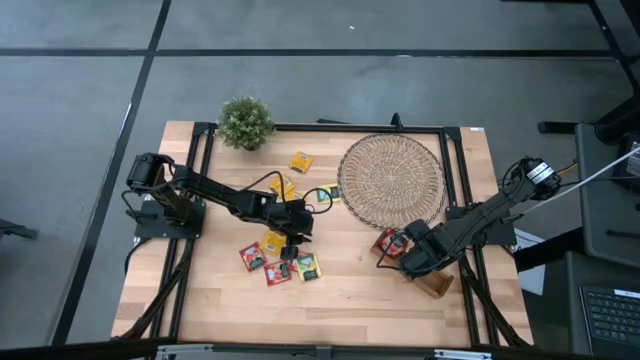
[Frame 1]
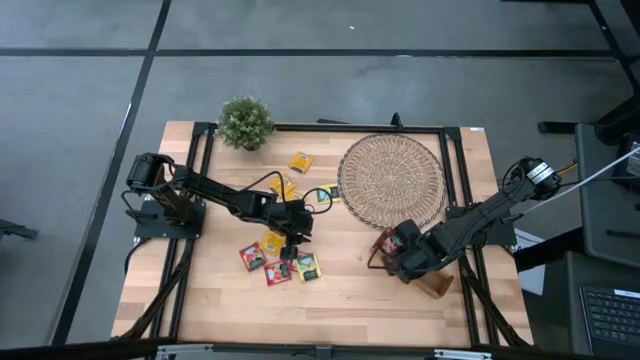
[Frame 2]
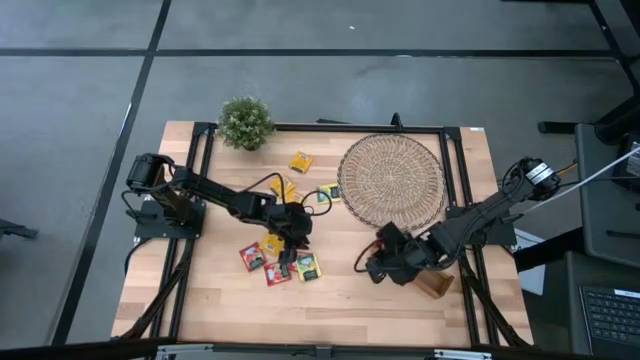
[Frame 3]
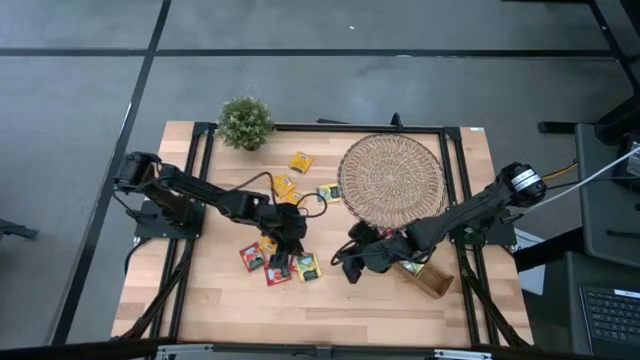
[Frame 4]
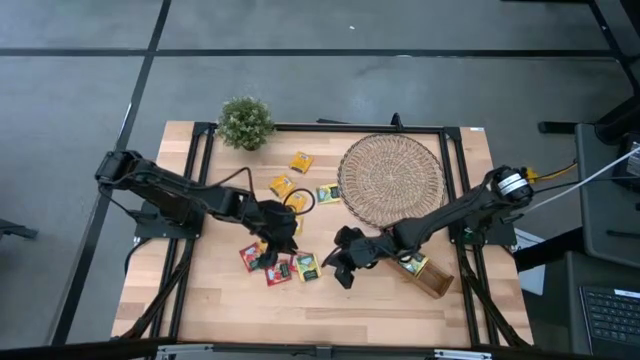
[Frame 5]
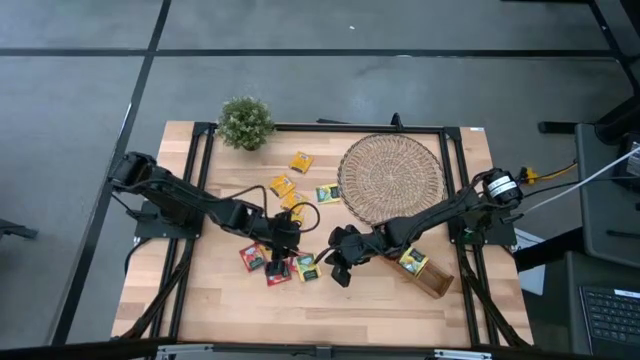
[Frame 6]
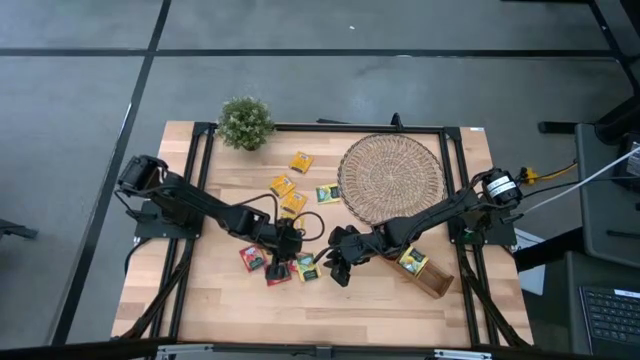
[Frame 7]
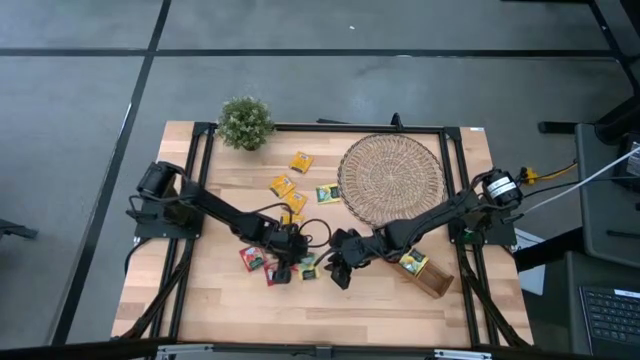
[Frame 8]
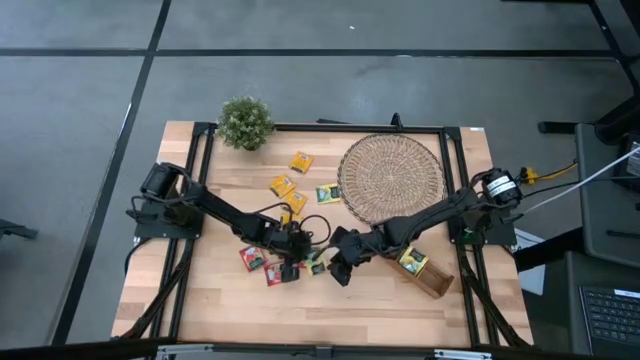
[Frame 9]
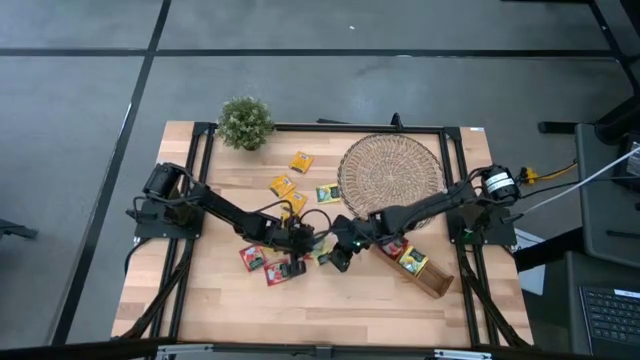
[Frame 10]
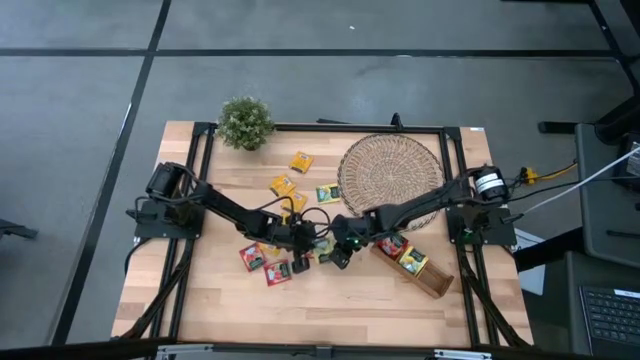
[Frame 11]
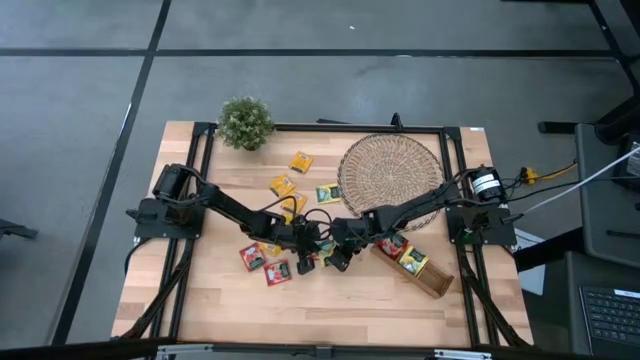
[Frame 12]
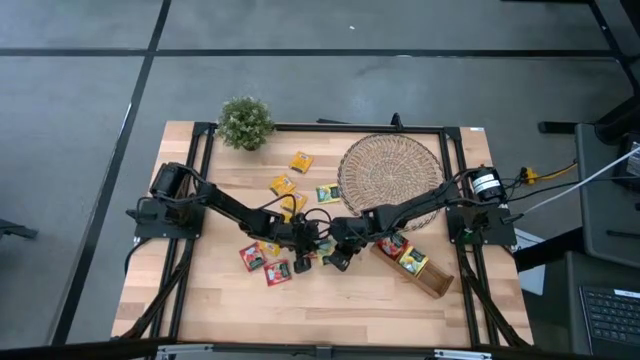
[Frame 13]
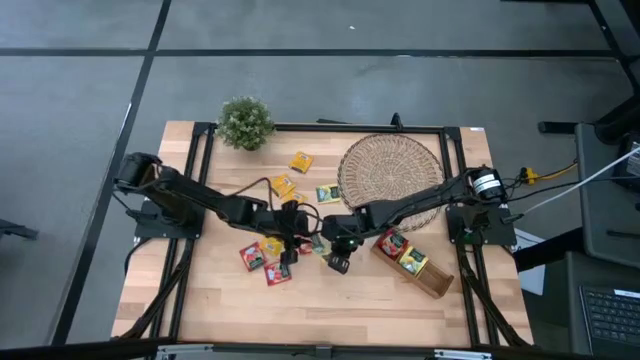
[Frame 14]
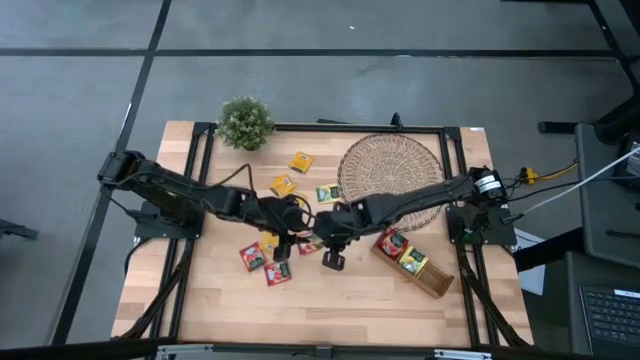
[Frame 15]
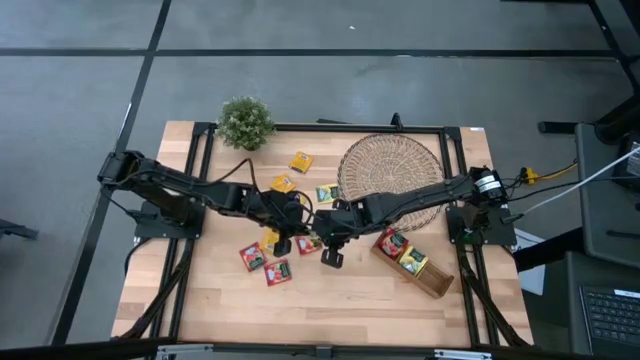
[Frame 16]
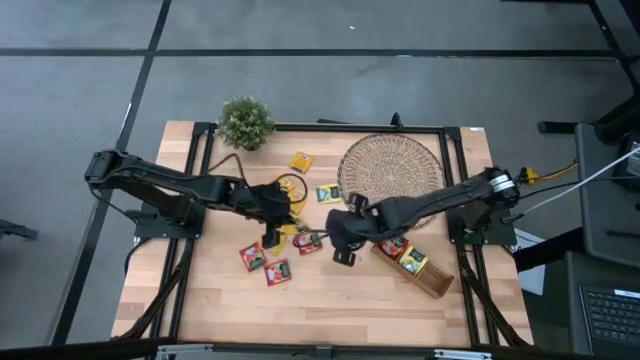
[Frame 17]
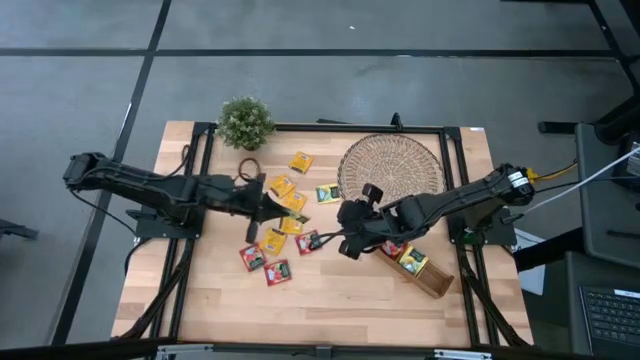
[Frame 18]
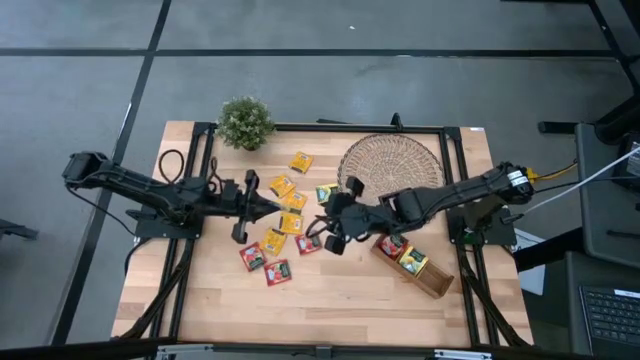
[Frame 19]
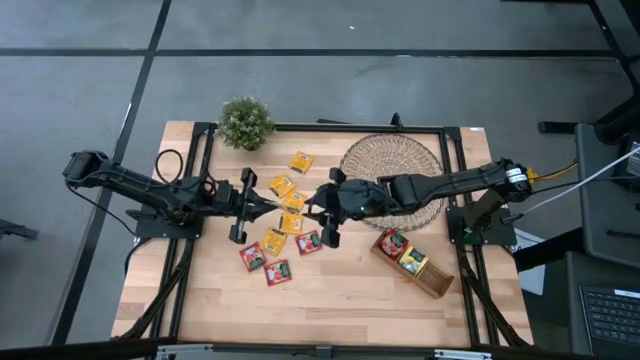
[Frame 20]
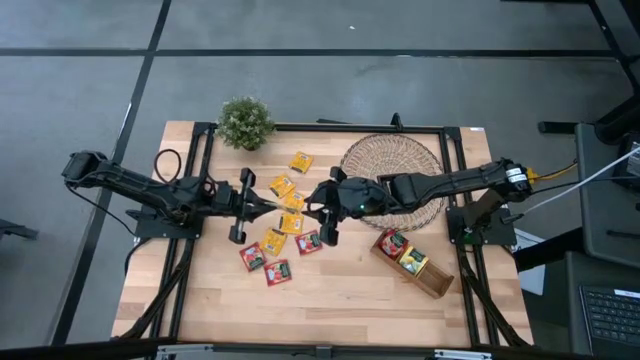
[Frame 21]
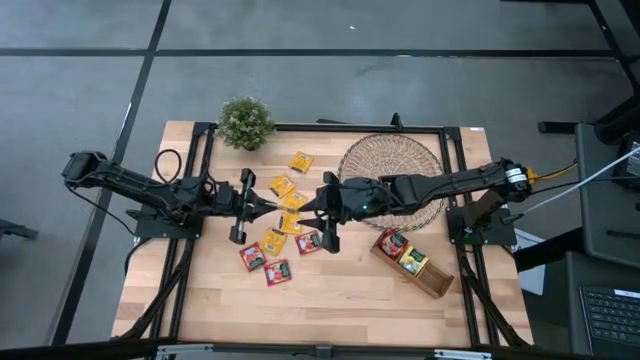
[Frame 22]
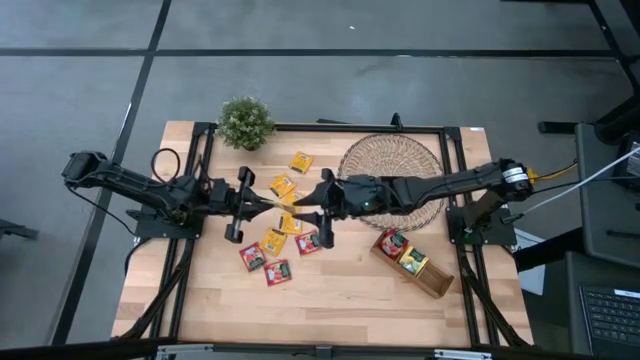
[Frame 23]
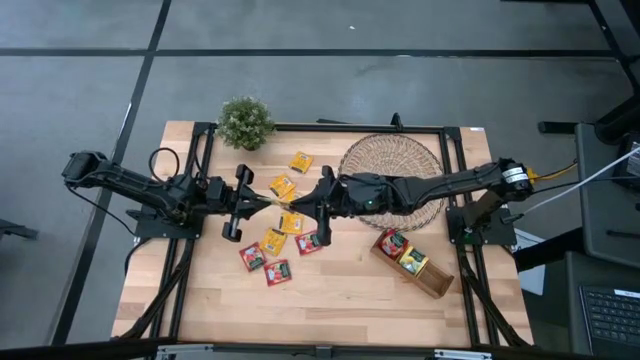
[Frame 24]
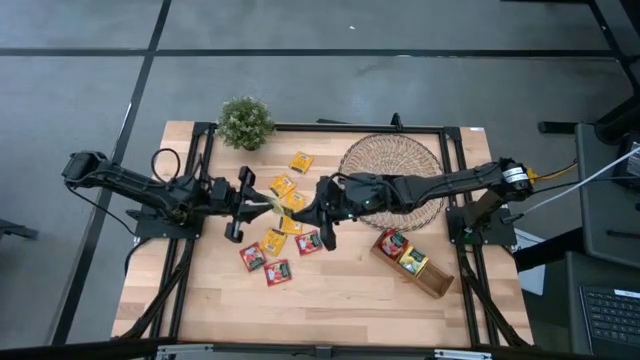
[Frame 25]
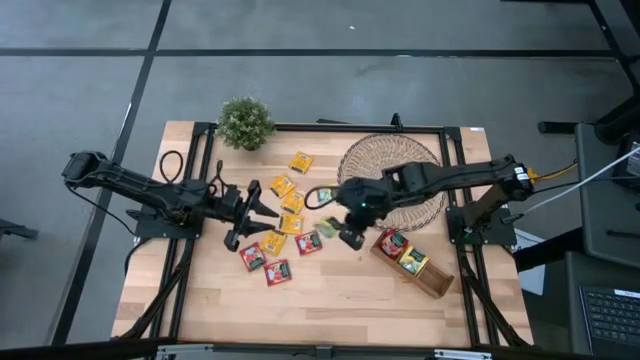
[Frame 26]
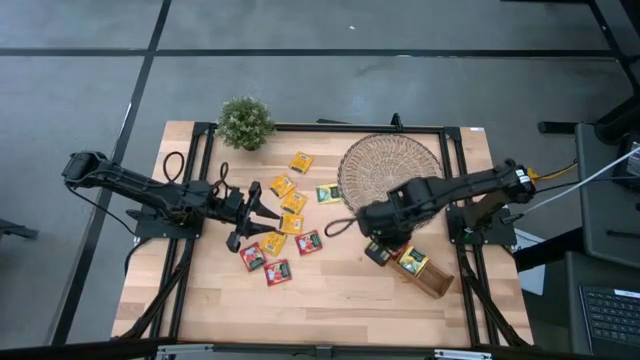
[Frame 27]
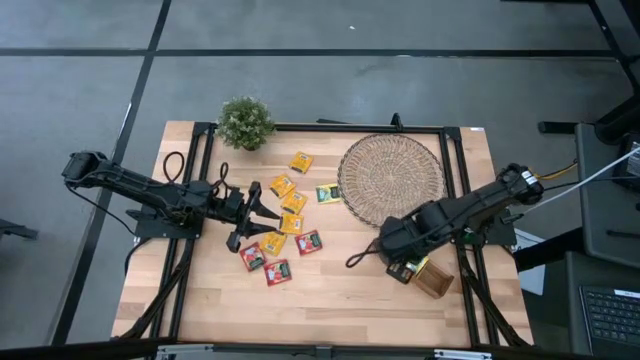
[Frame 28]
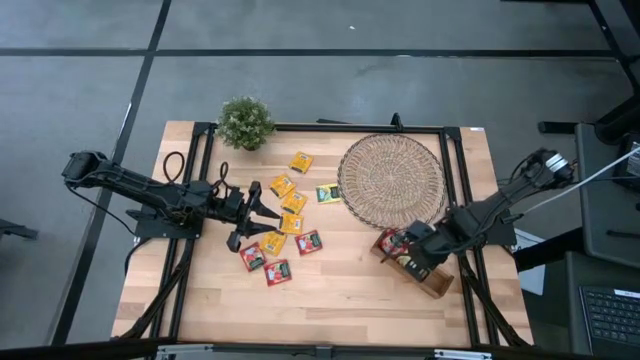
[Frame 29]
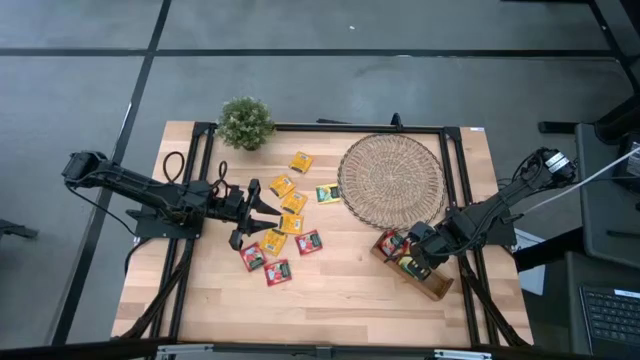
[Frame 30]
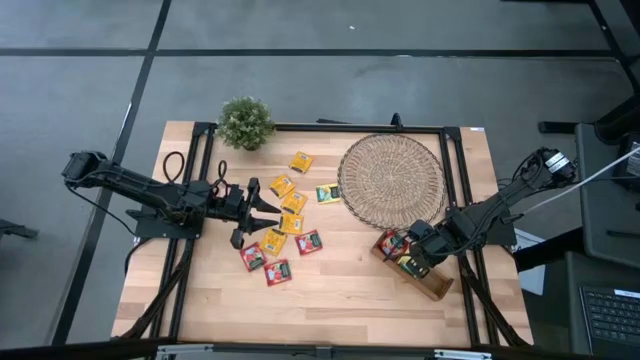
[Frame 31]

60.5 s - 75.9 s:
Task: Pick & Place Tea
Put the bottom yellow tea bag into the middle slot of the wooden organizer

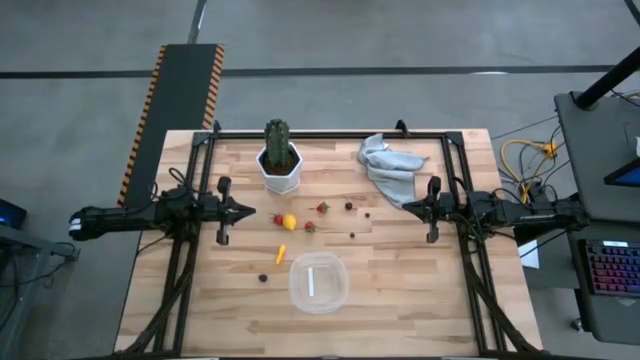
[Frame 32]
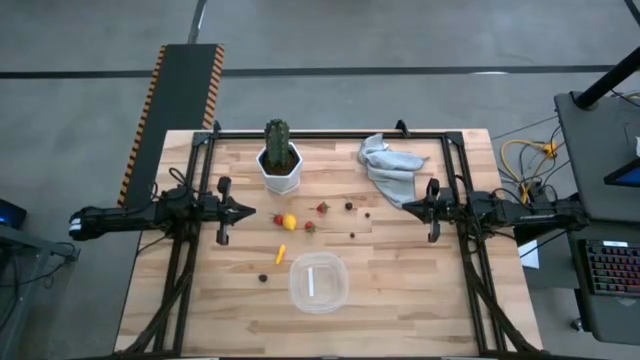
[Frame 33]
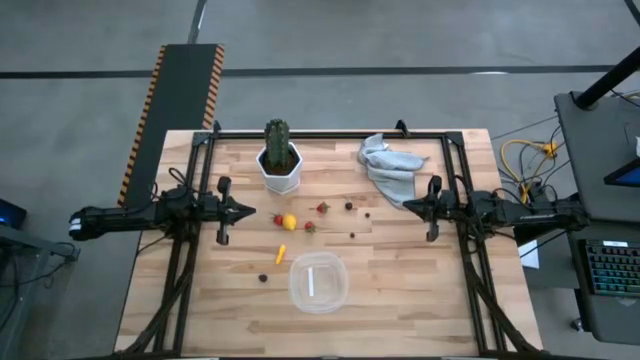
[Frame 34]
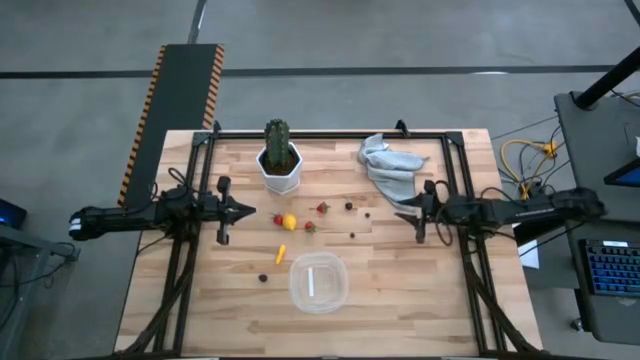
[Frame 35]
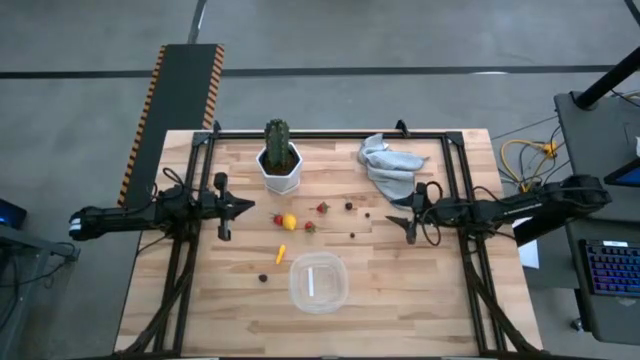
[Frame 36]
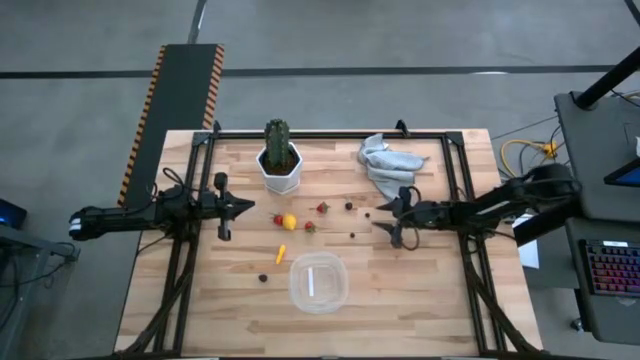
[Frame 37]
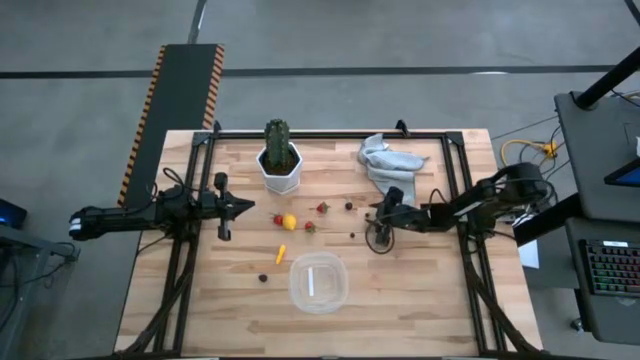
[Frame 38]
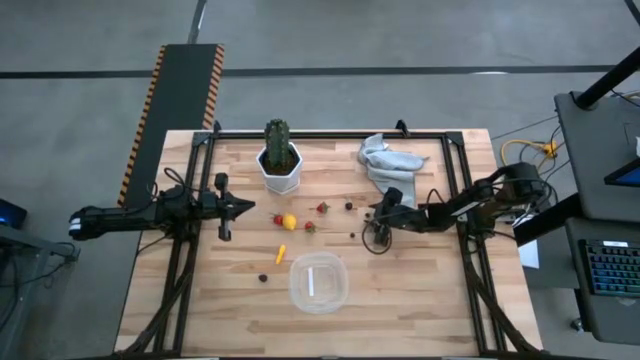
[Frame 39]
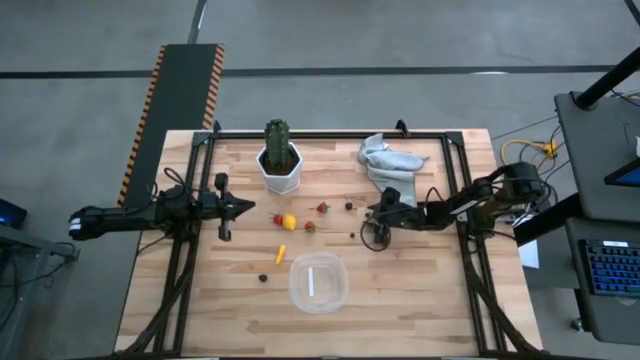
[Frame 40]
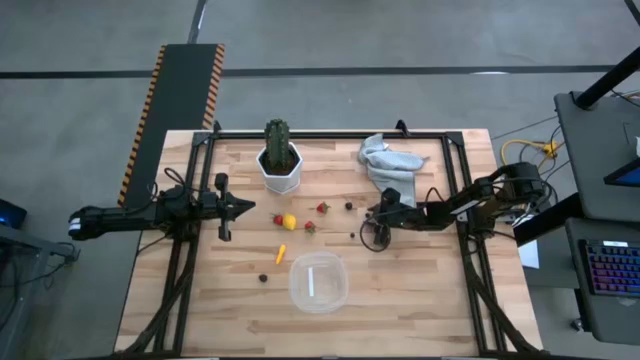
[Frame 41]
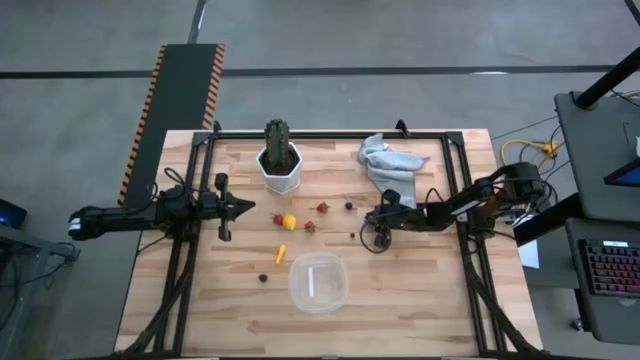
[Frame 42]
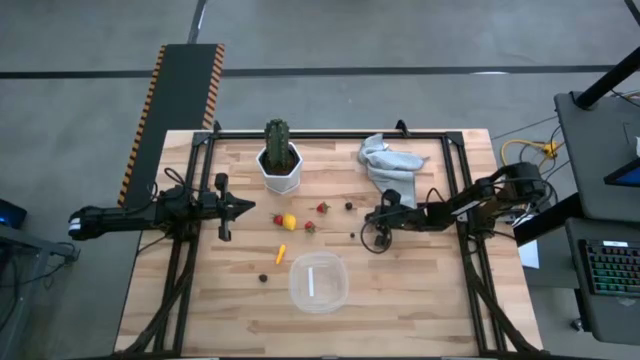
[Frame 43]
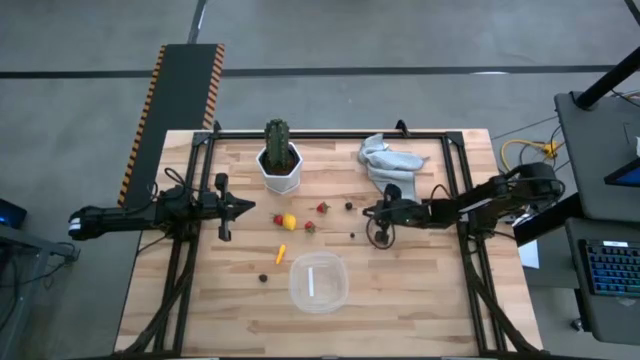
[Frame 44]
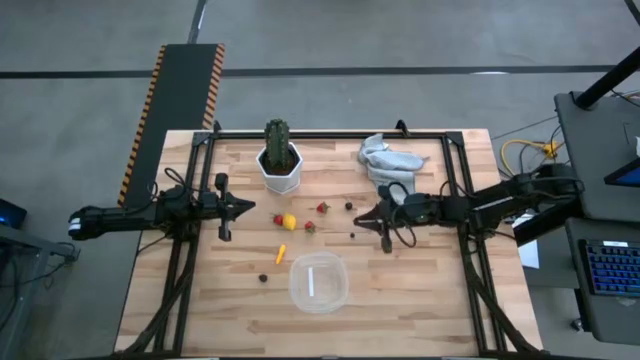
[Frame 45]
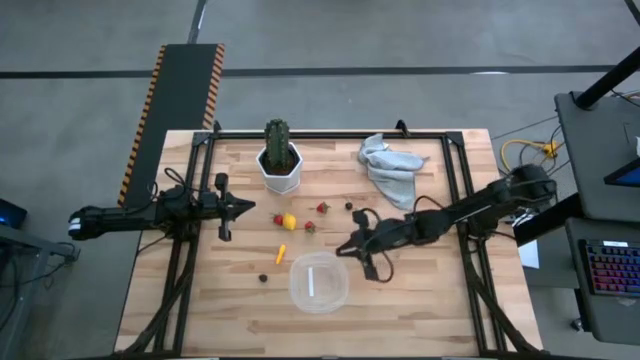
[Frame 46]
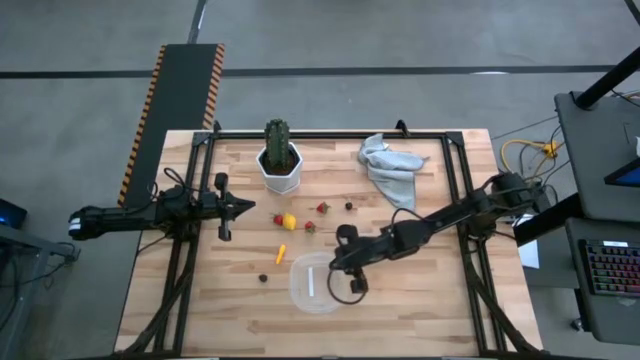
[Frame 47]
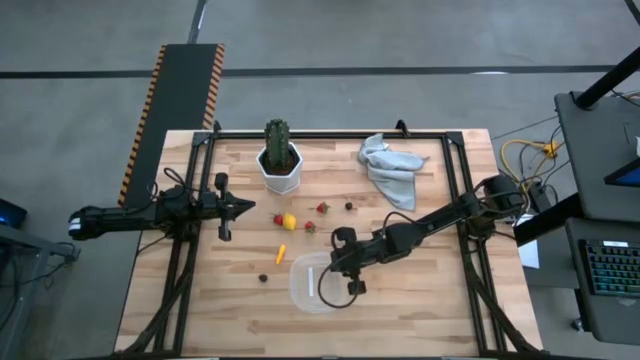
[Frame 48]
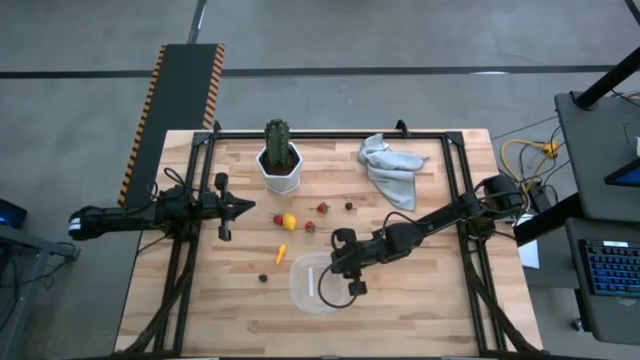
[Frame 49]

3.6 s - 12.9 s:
Task: Pick and placing Produce into tupperware
Put the top blueberry into the transparent container
